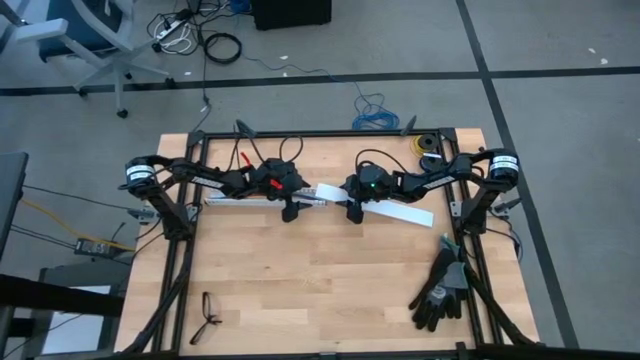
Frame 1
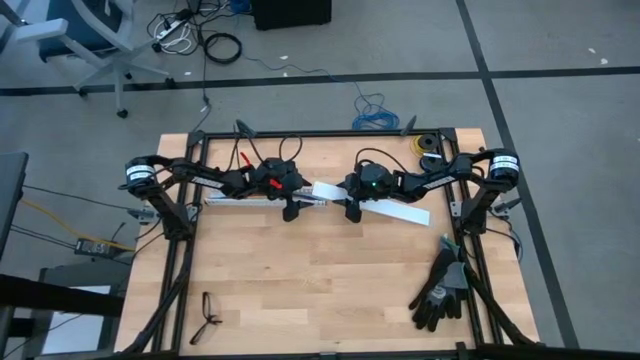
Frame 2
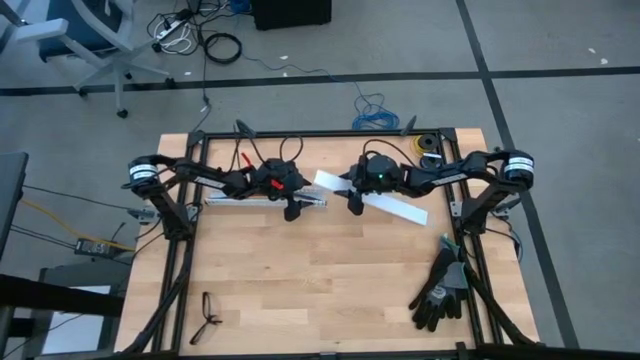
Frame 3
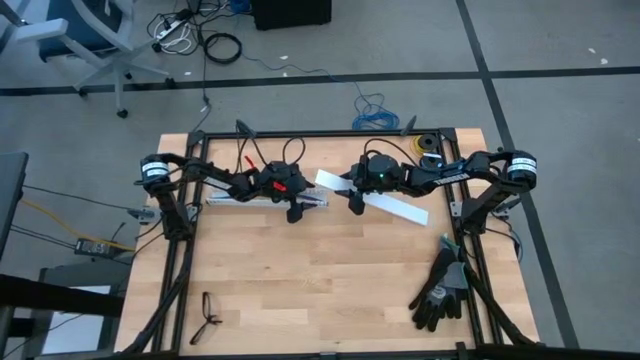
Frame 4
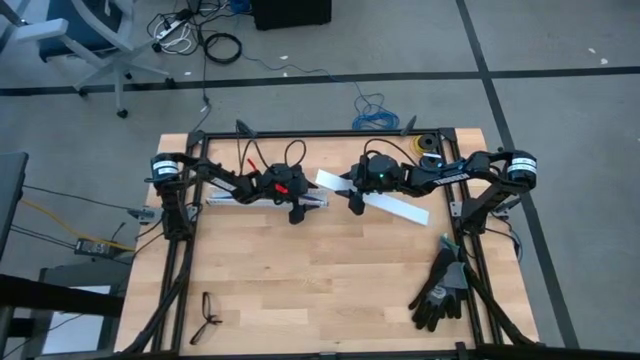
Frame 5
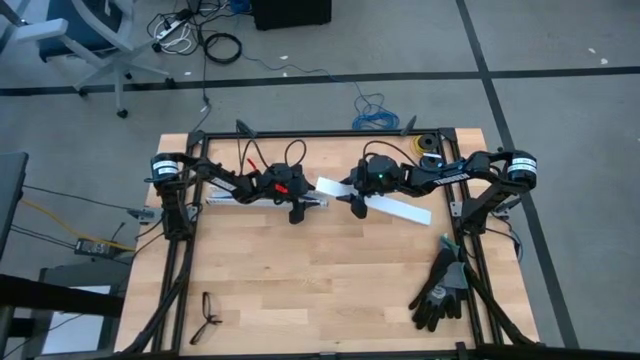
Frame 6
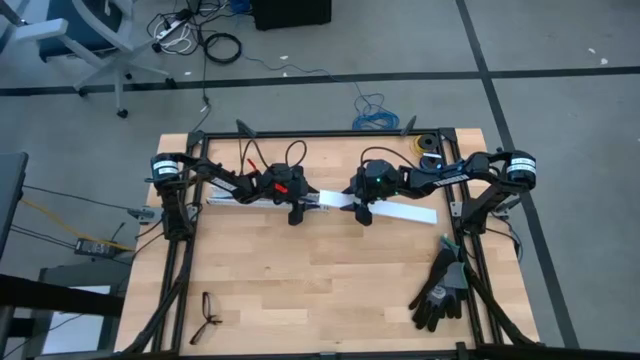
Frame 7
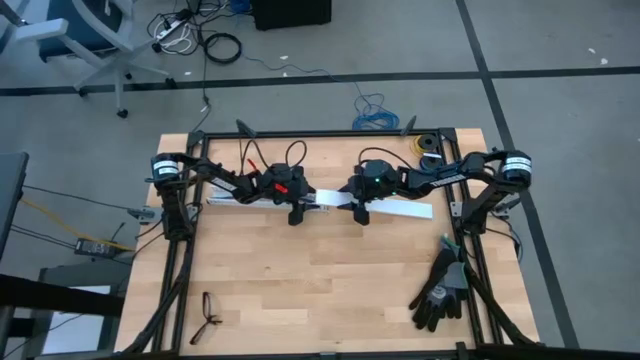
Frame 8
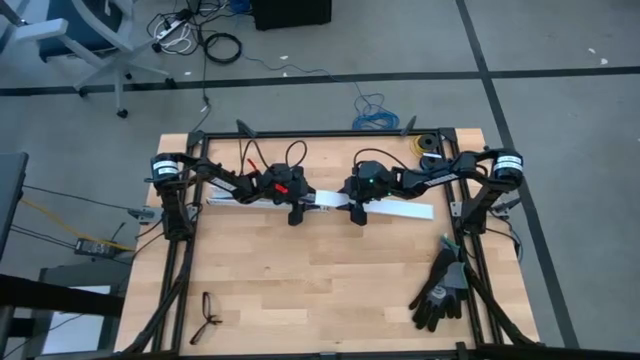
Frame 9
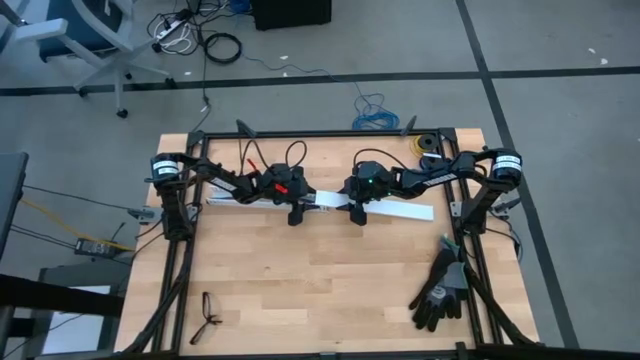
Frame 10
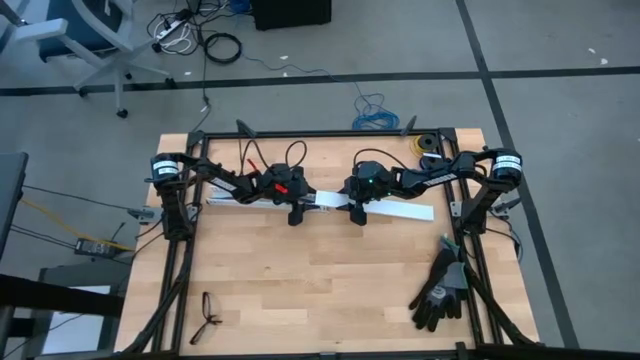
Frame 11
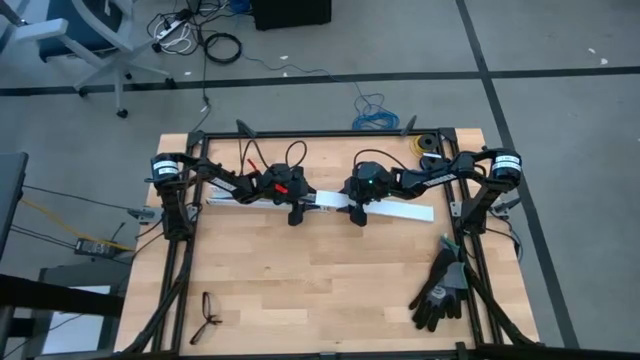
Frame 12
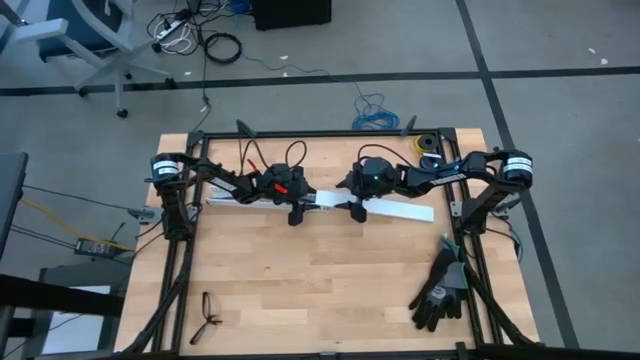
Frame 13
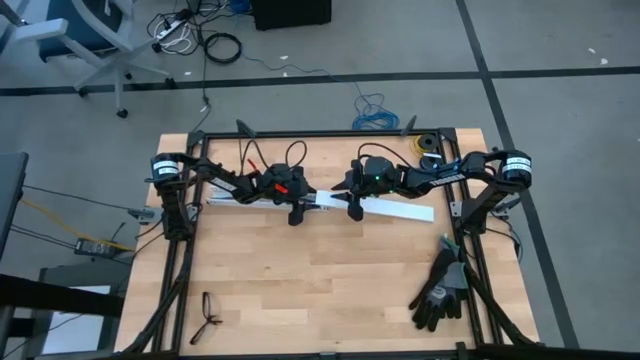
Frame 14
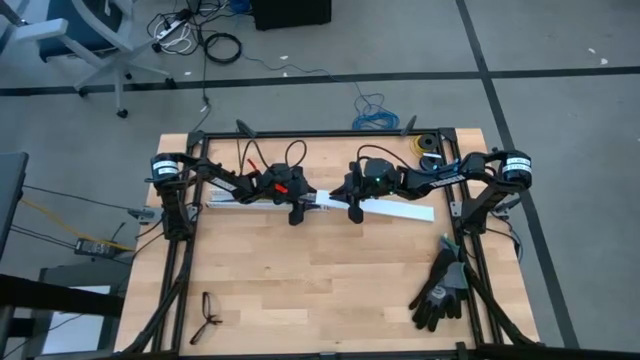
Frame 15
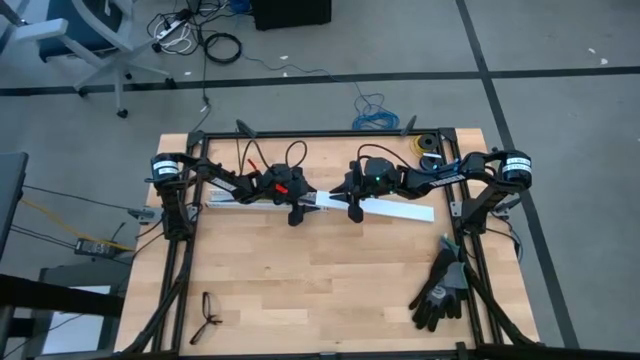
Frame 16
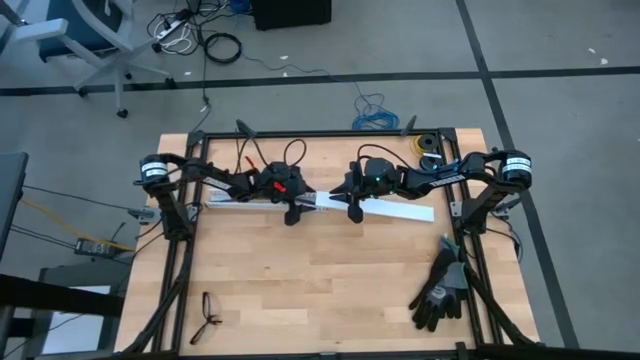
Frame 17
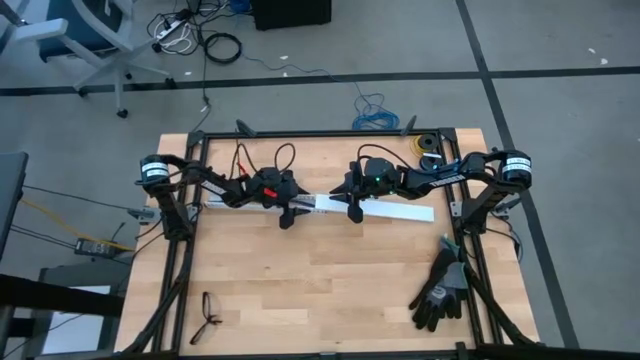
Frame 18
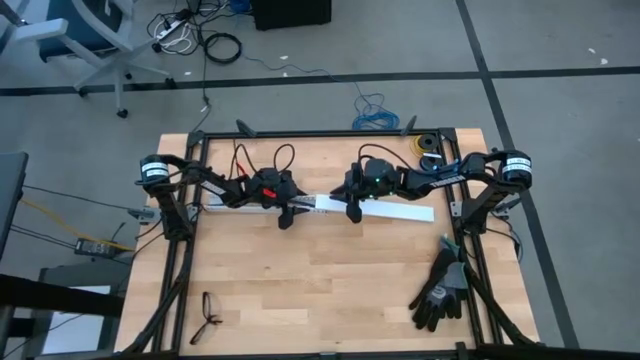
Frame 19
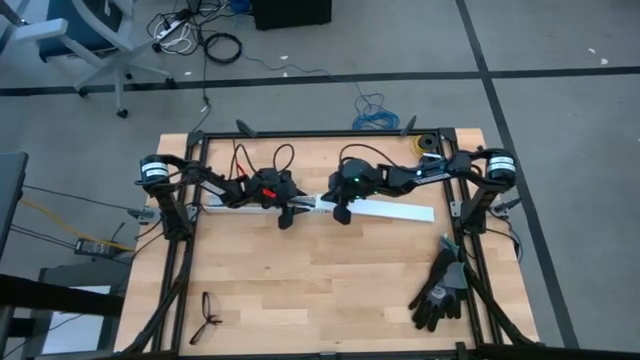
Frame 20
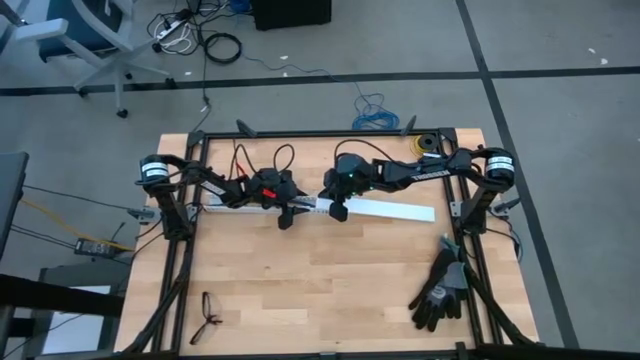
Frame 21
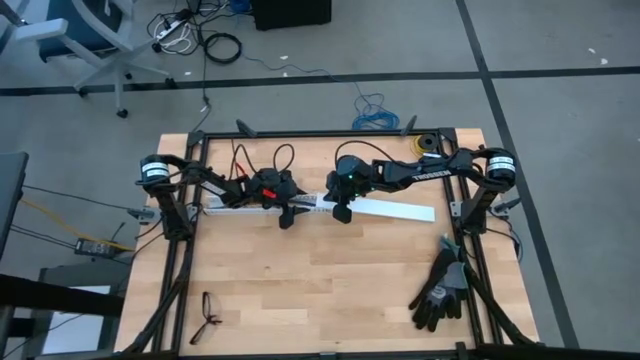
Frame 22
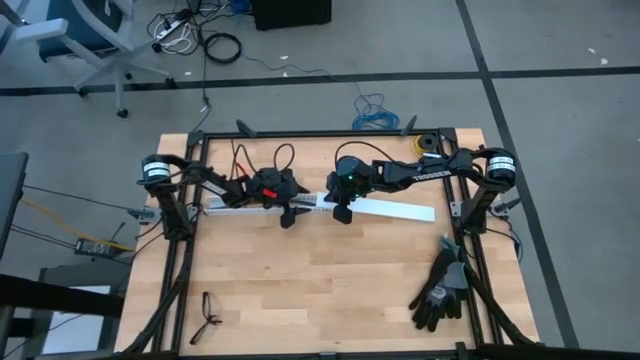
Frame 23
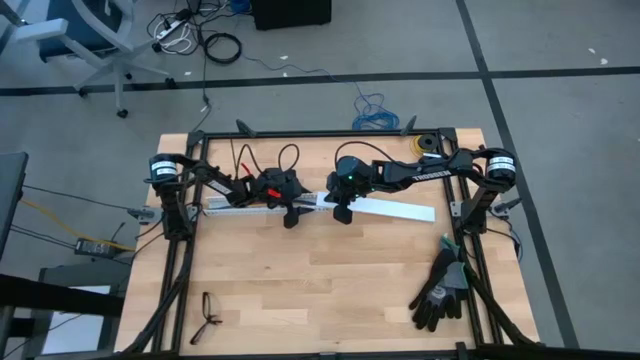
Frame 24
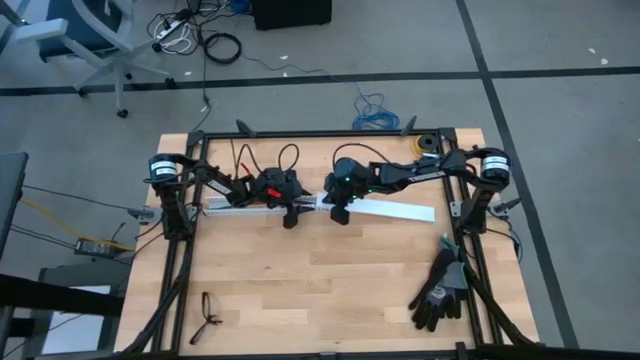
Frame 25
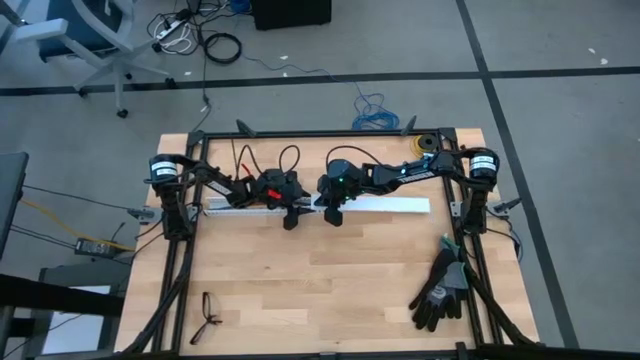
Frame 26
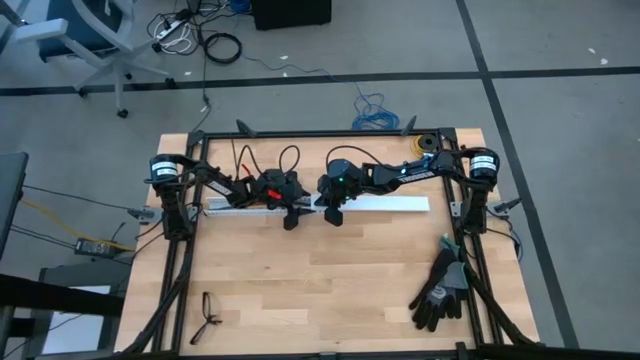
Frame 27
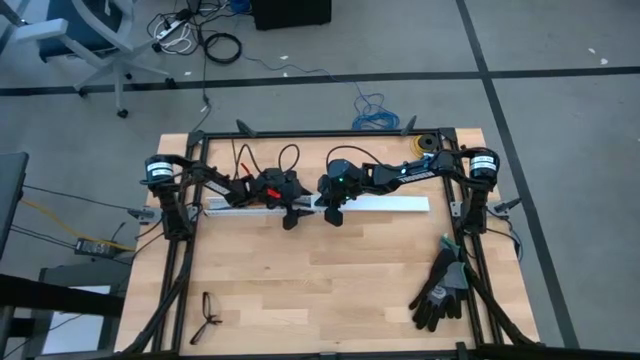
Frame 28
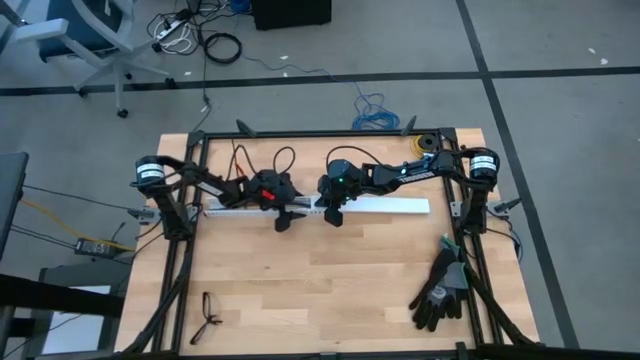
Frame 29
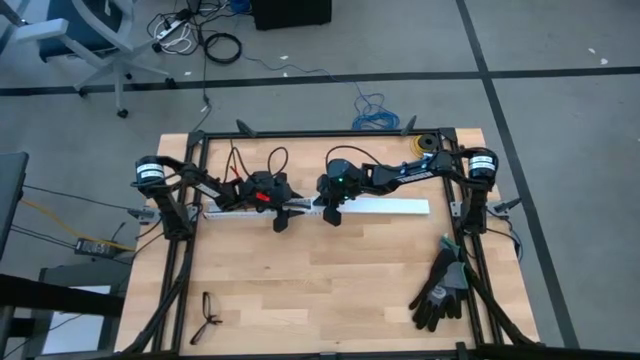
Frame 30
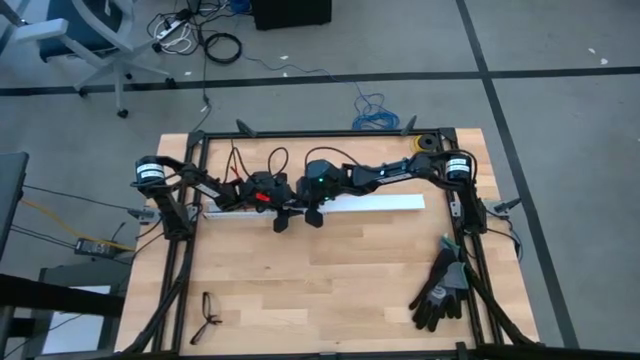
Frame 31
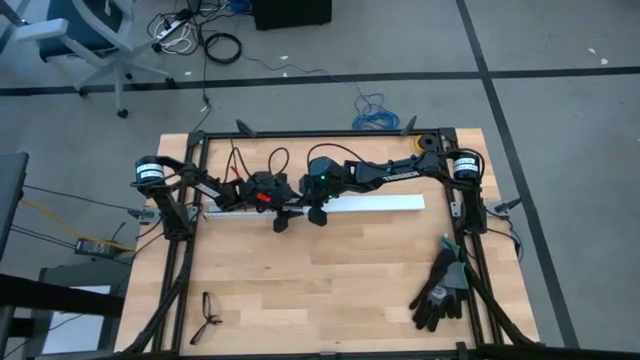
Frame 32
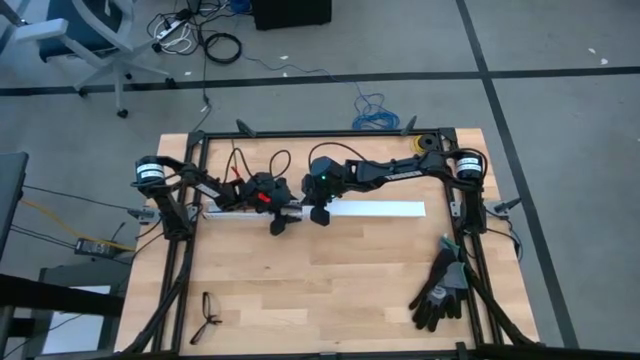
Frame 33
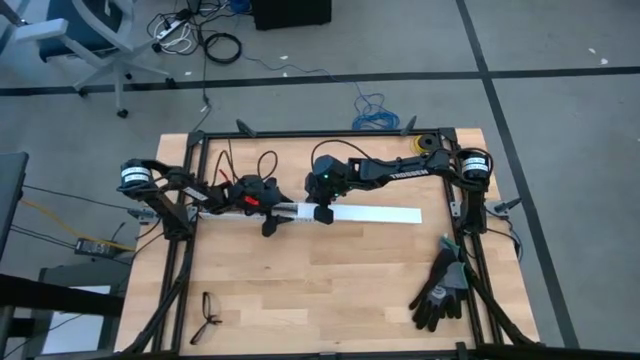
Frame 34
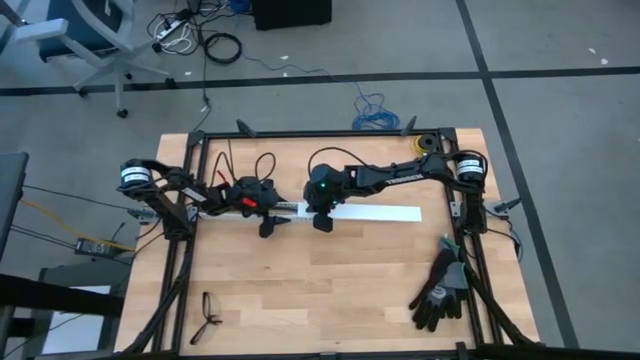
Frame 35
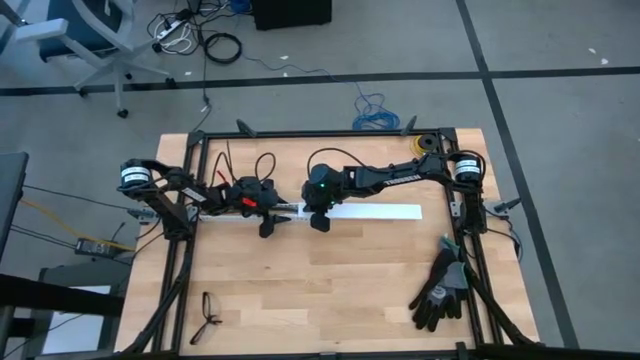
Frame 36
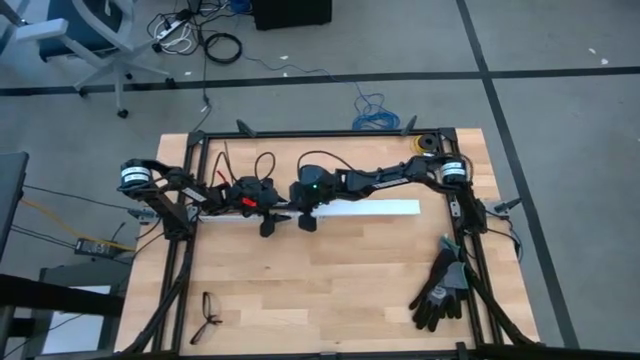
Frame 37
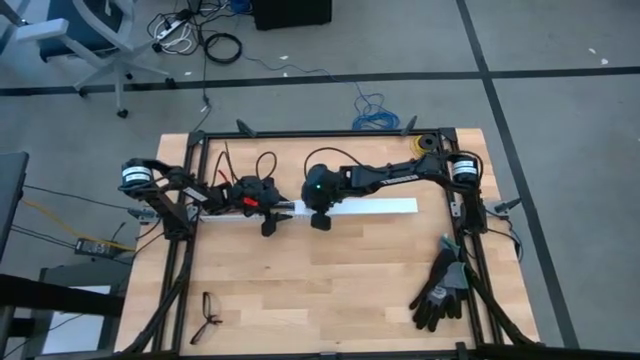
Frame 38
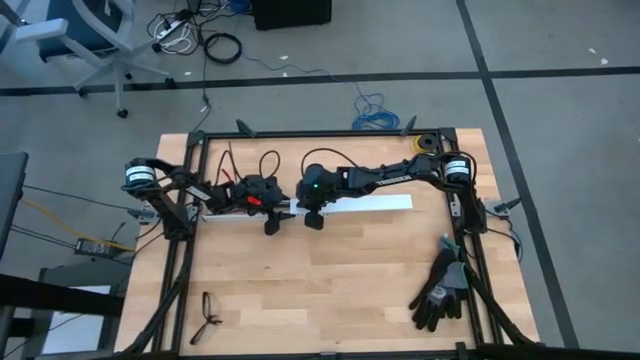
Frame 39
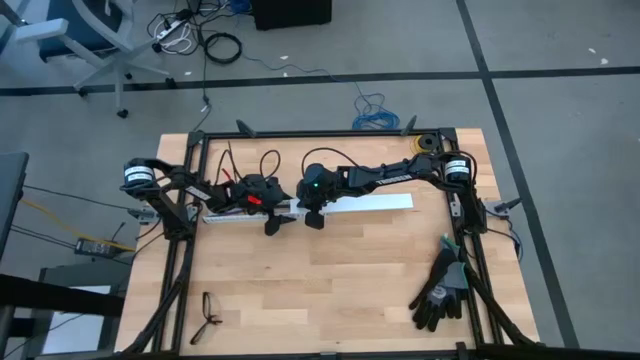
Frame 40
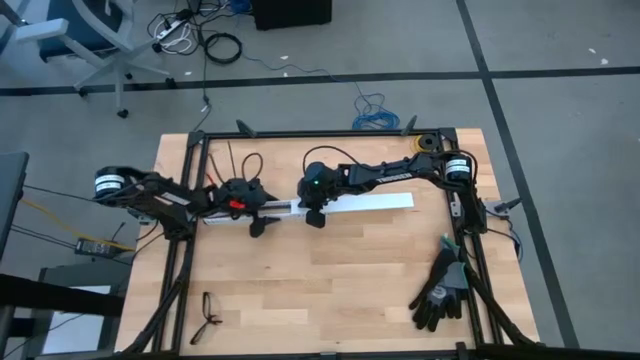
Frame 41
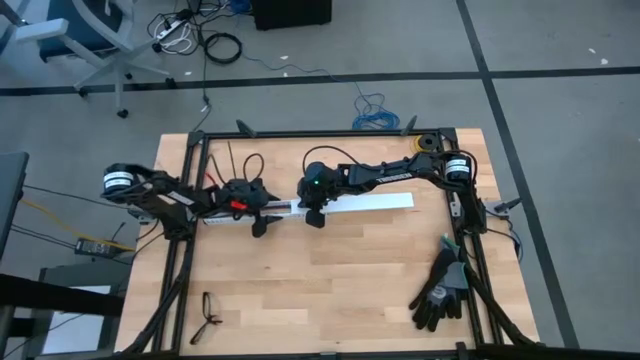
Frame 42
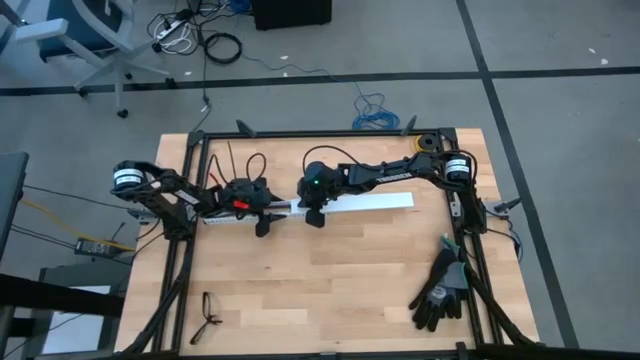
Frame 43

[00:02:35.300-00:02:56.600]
Task: Ziptie cables
Close the white cable duct with the white cable duct cover
